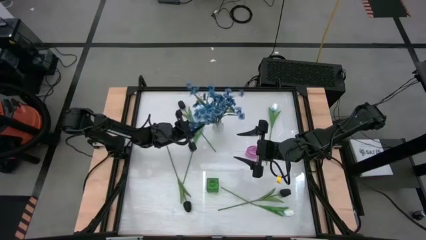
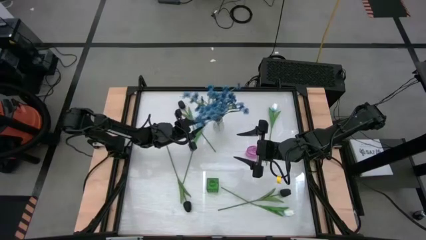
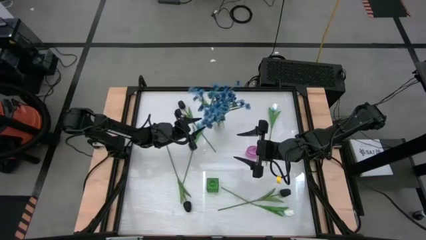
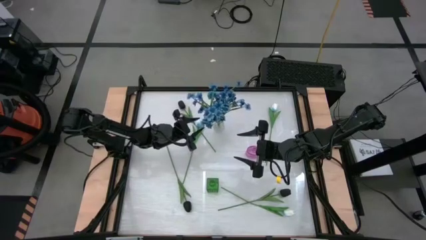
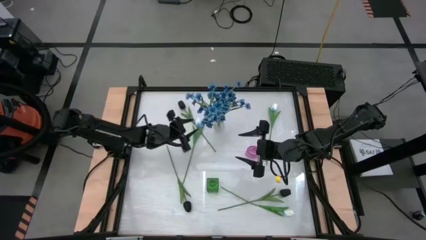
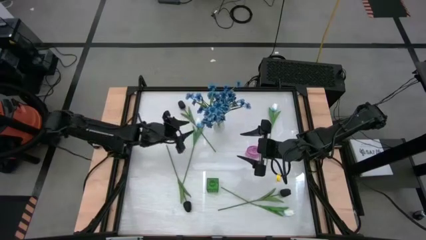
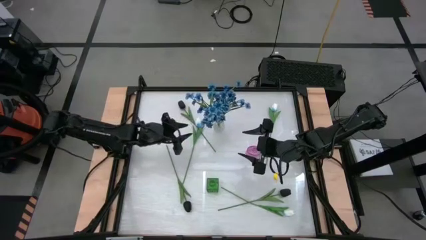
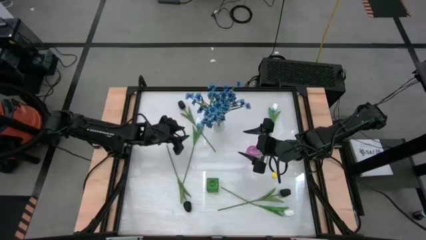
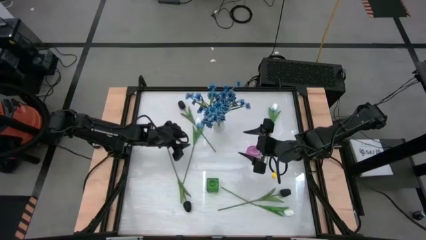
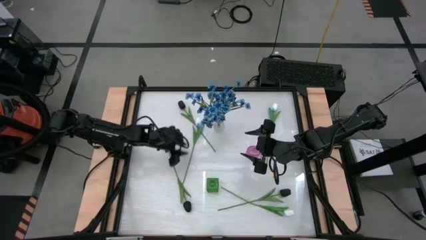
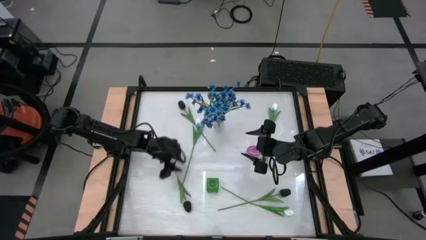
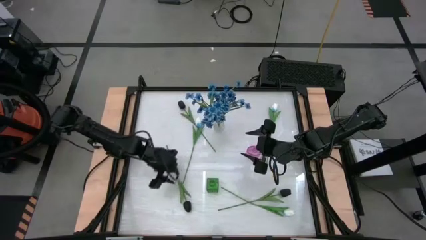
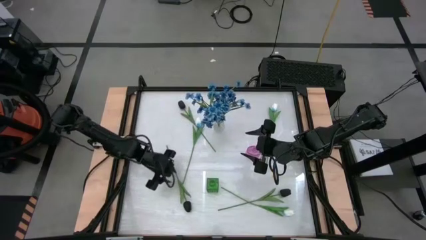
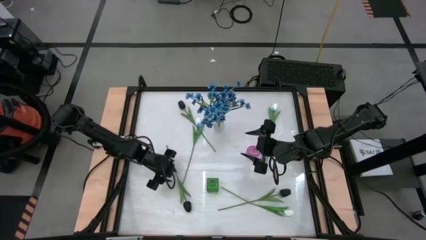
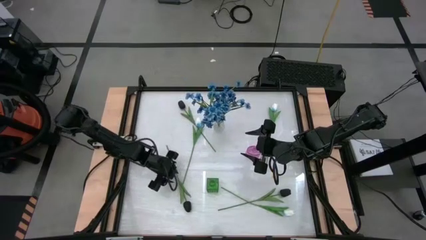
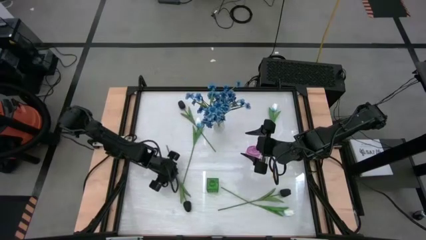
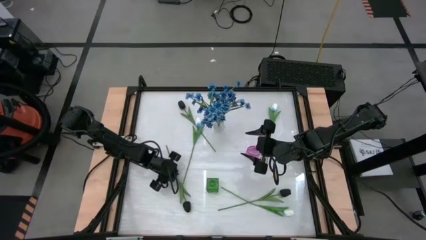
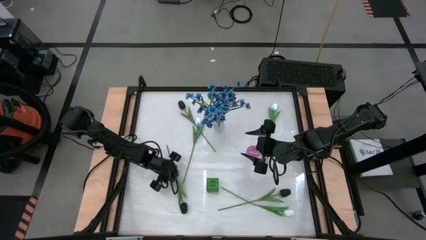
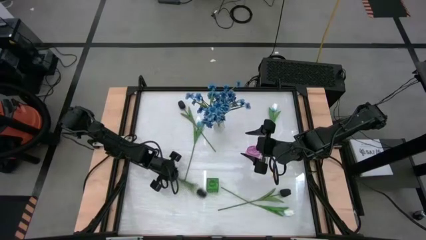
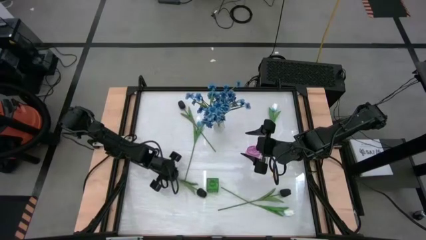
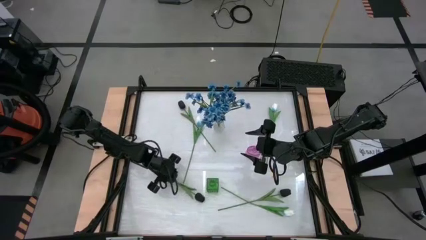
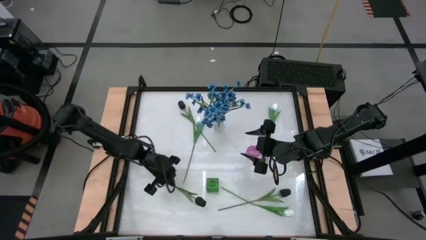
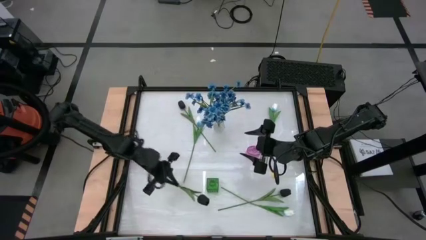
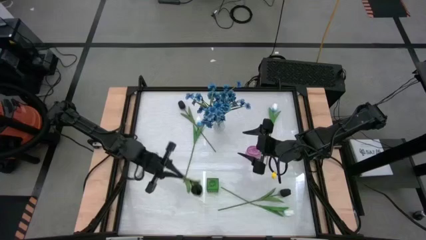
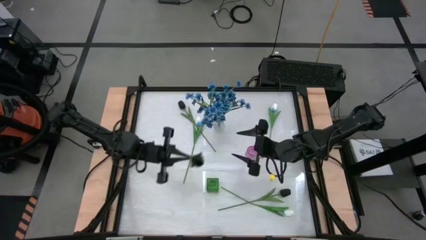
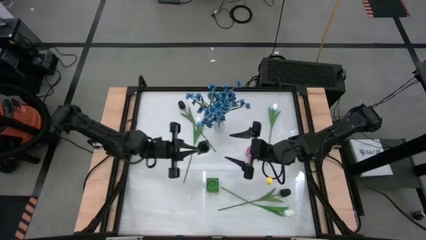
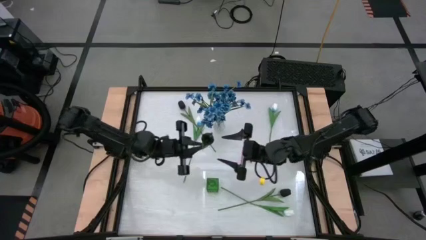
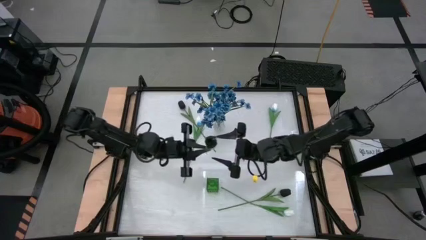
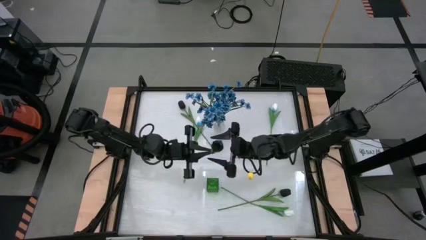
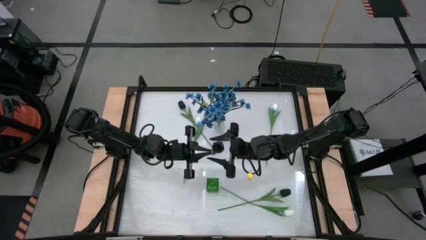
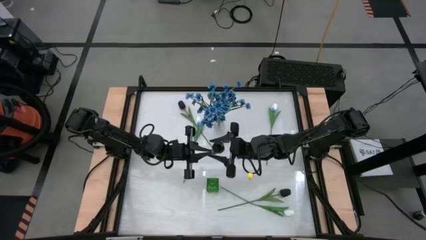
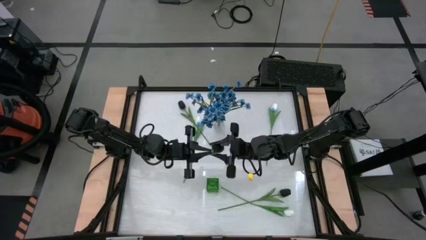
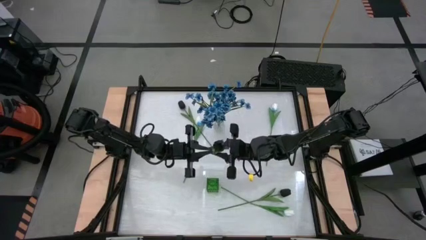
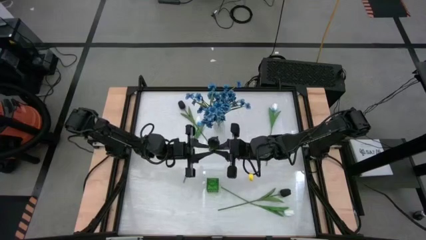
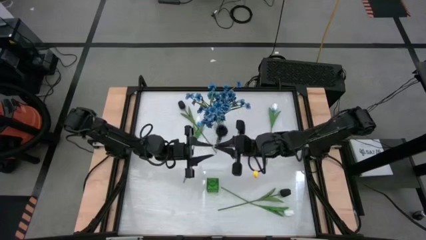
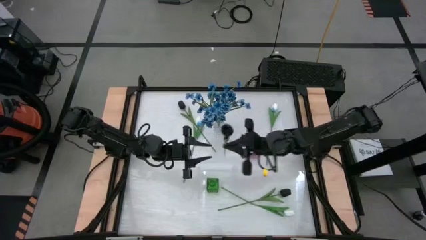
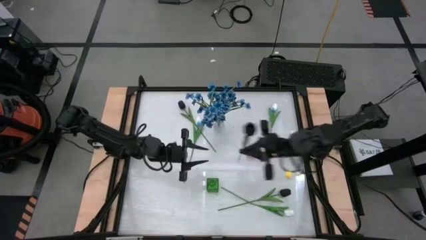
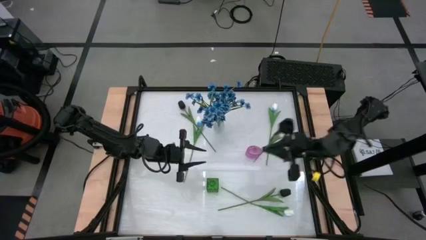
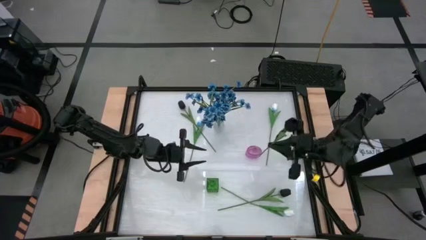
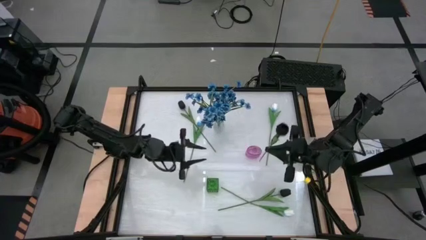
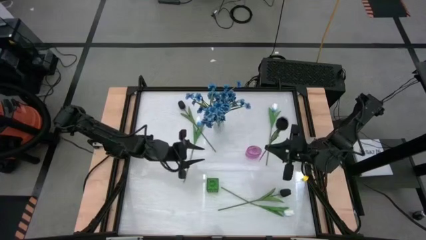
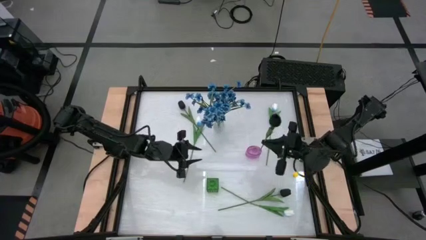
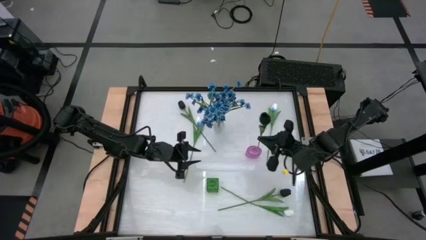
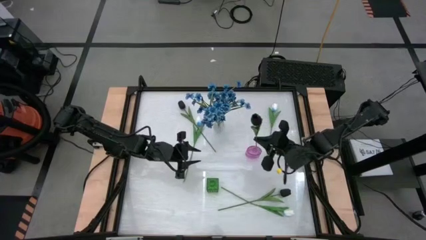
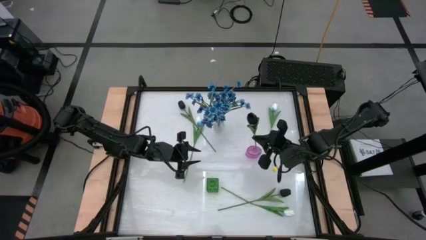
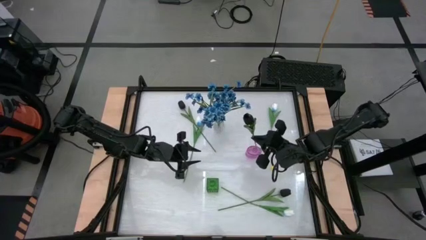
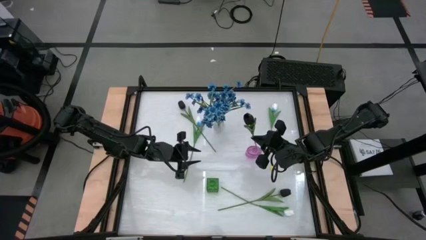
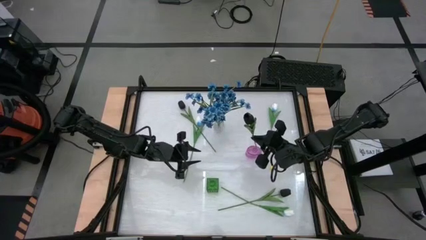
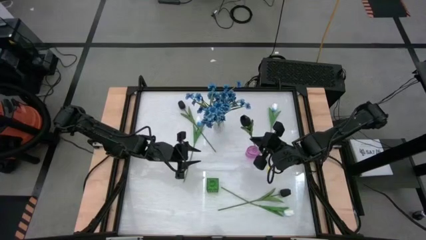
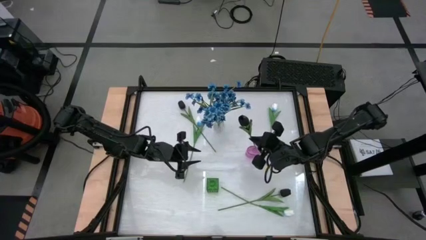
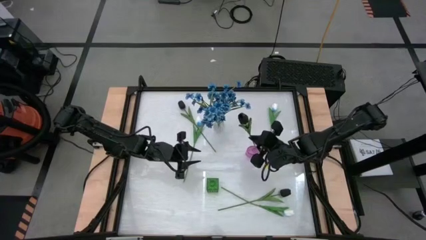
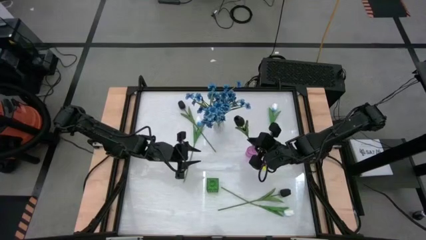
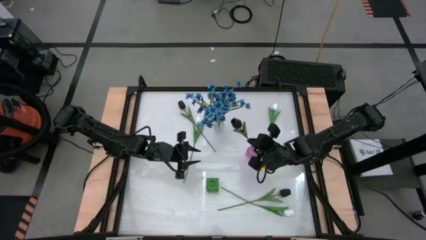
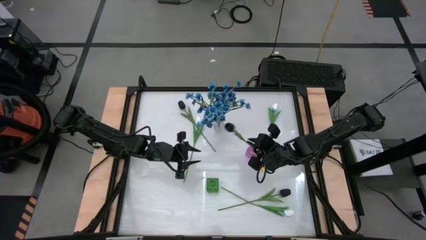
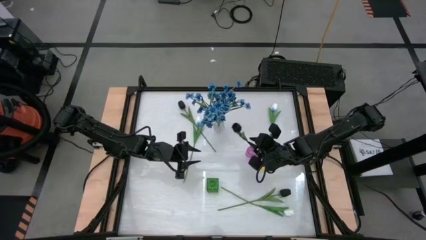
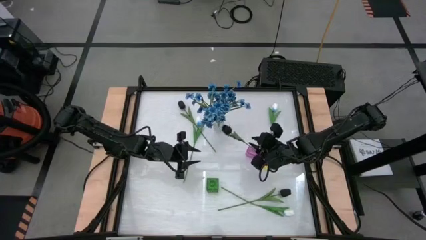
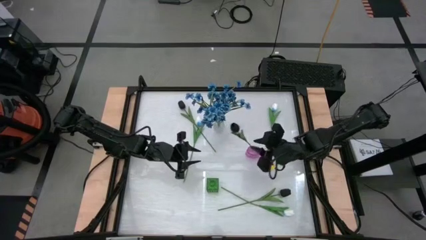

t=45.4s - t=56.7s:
Task: Sort flowers into vase by color
Put the bottom left black tulip into the purple vase

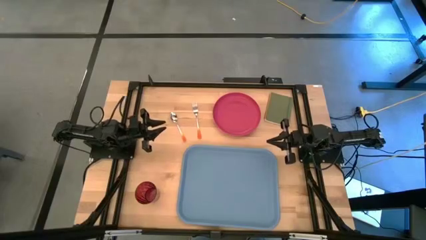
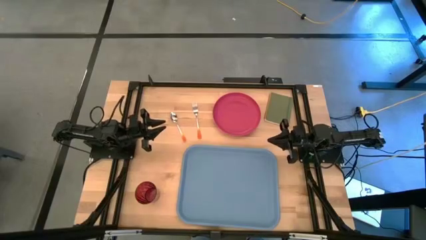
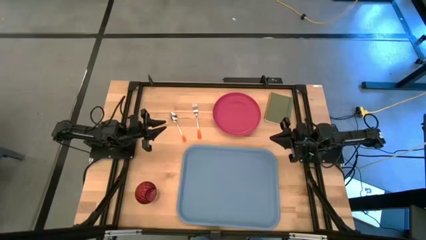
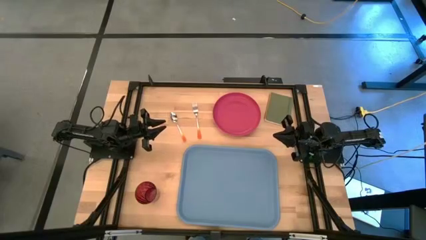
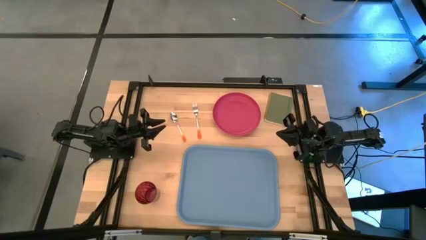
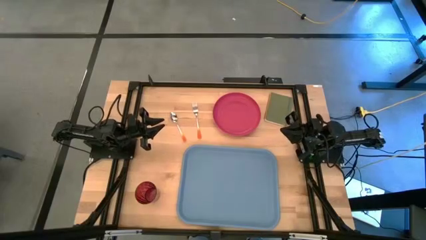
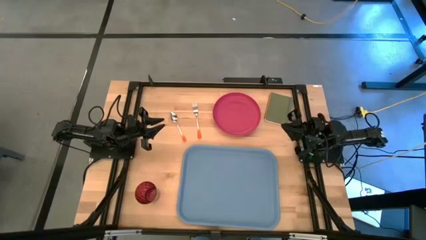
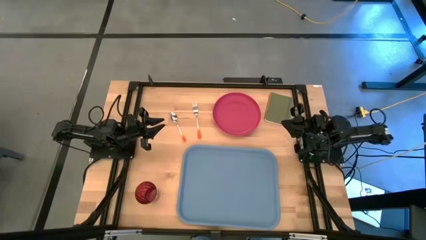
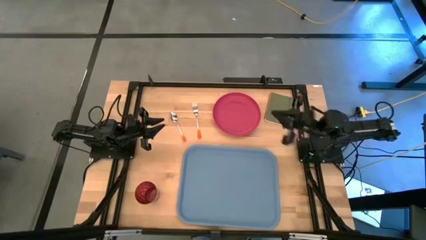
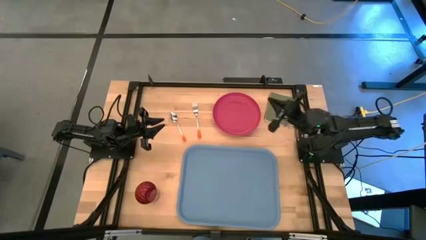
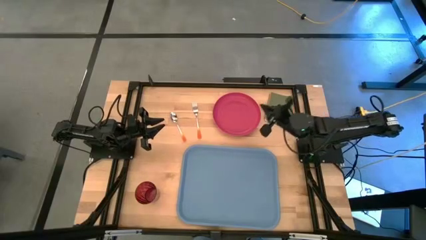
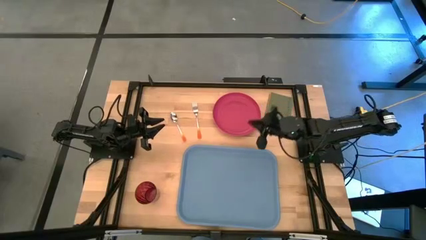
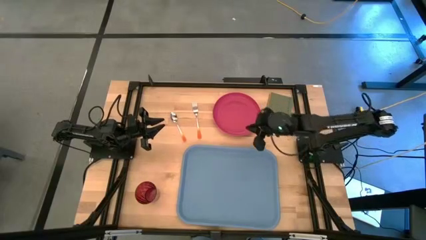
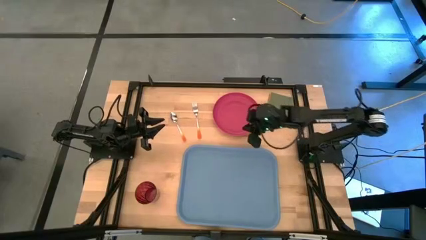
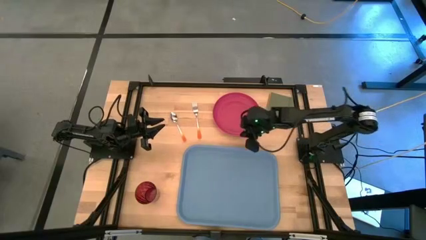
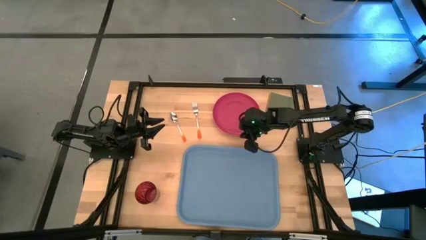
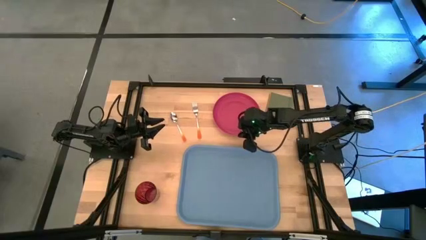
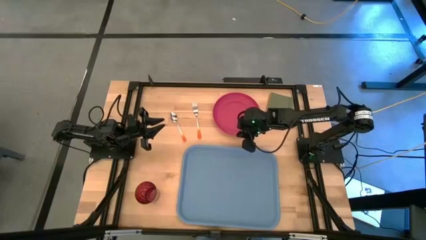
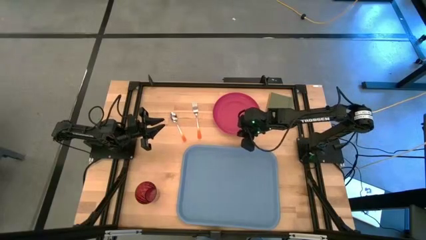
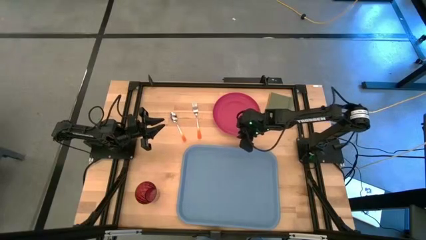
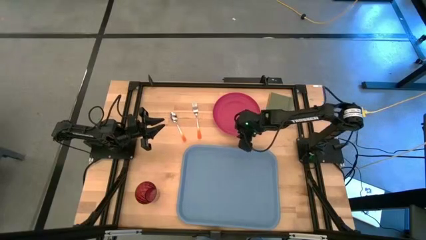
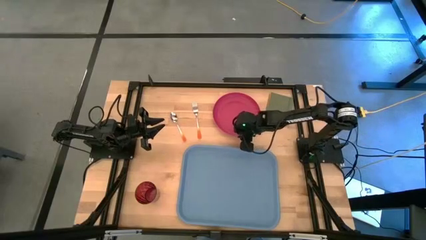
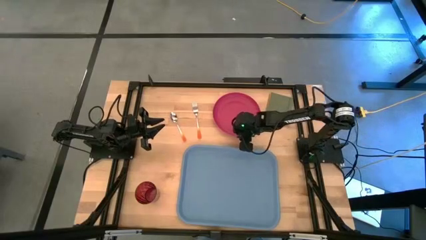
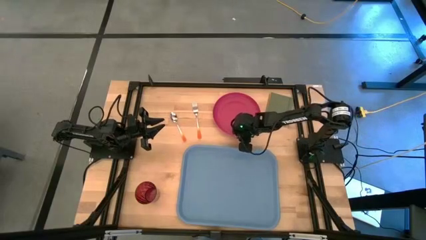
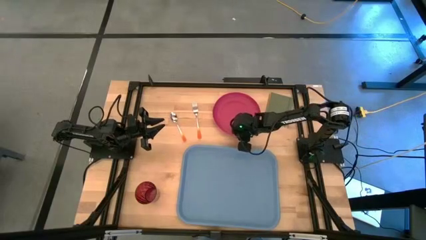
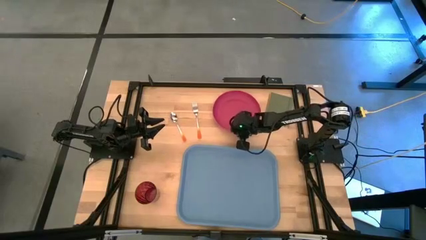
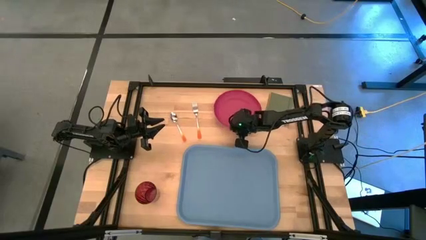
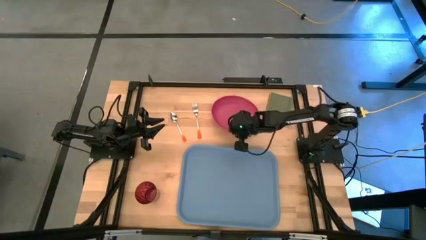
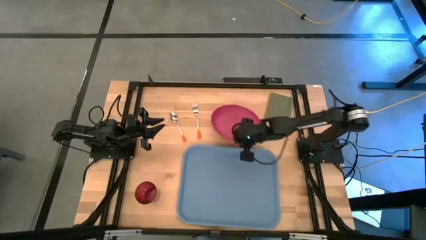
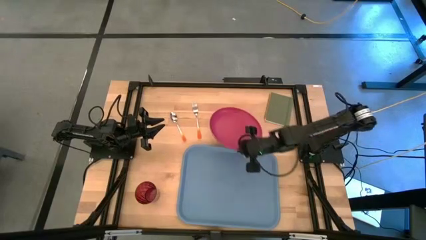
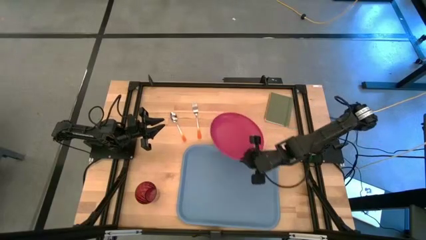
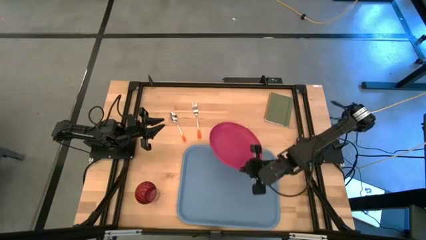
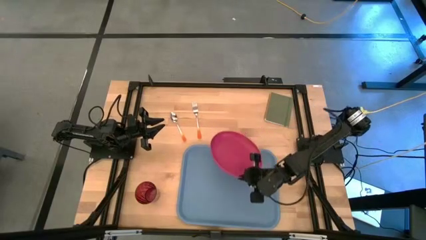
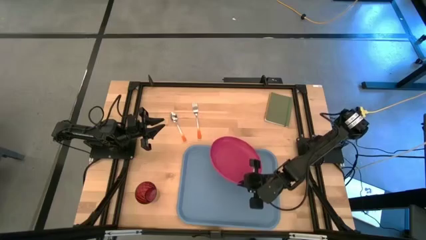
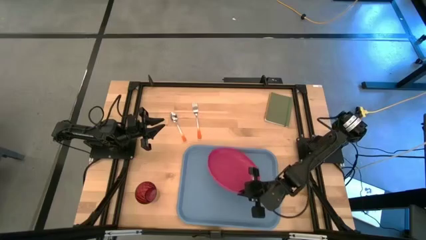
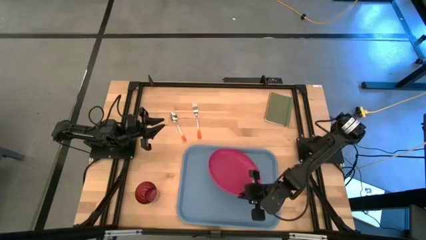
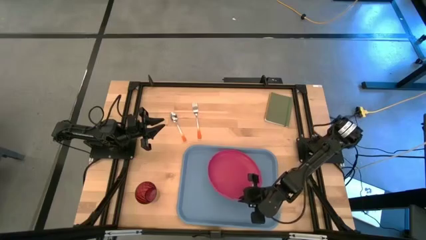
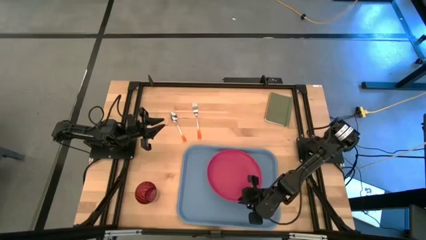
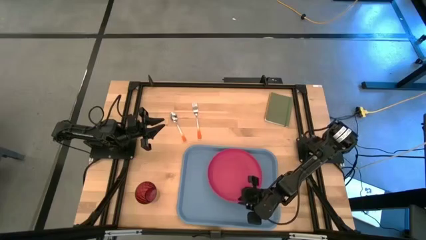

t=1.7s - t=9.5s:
Task: Pick and place plate/cup/fork/spoon on tray
Put the pink plate on the blue serving tray
